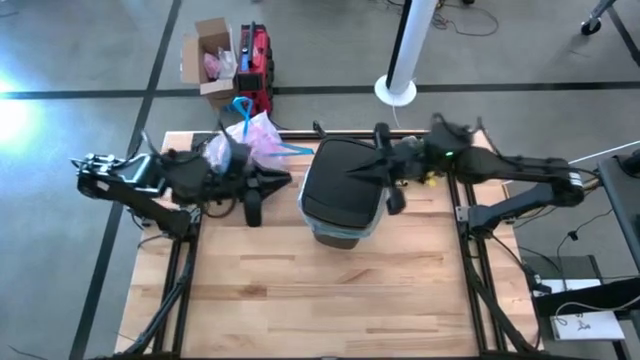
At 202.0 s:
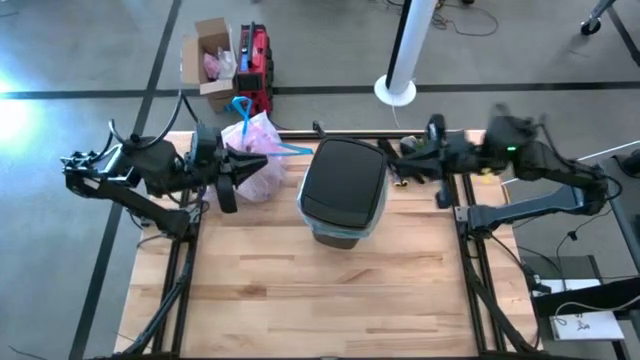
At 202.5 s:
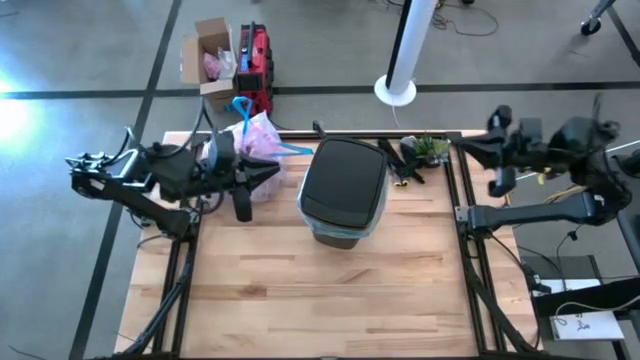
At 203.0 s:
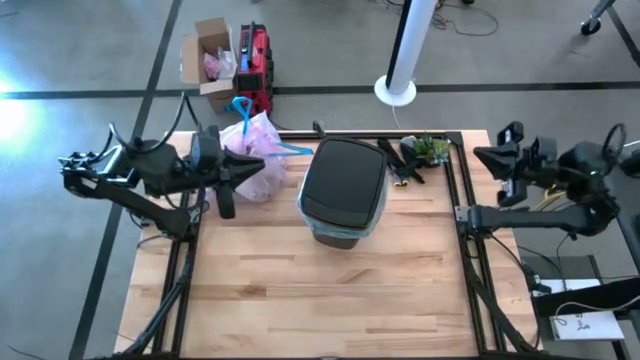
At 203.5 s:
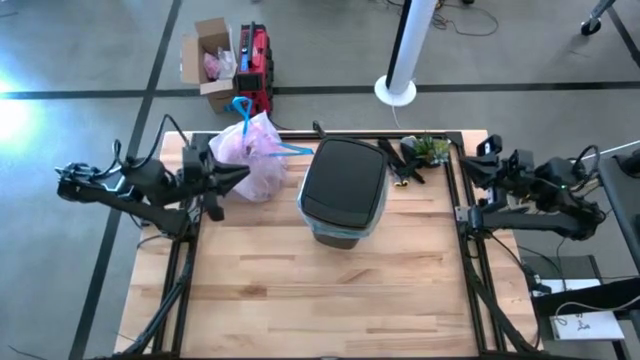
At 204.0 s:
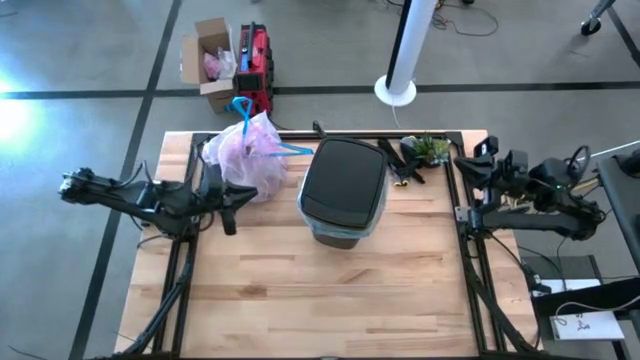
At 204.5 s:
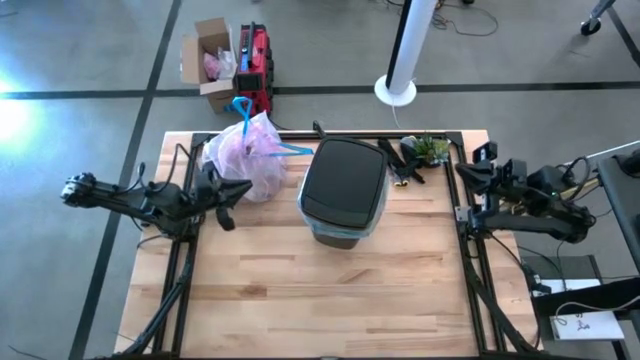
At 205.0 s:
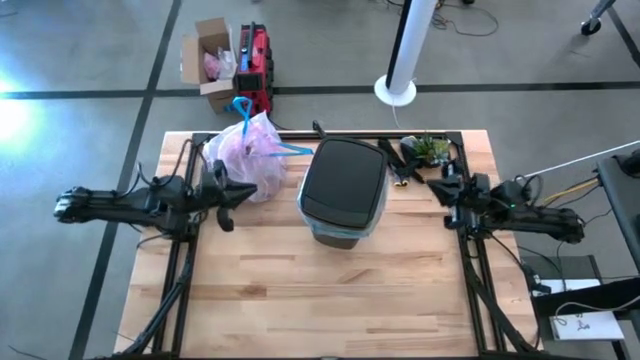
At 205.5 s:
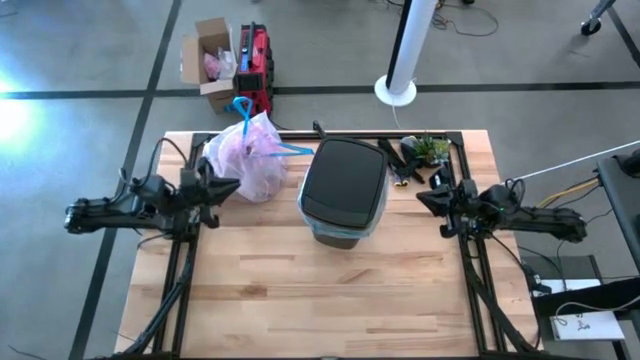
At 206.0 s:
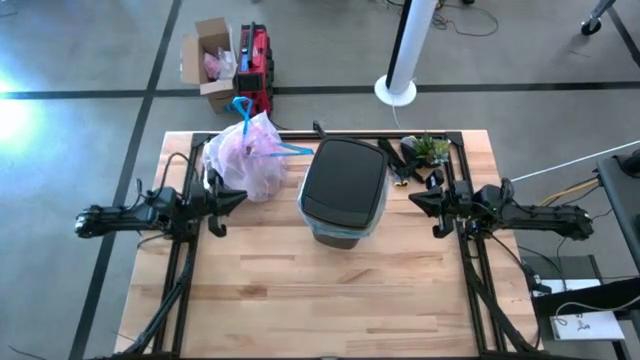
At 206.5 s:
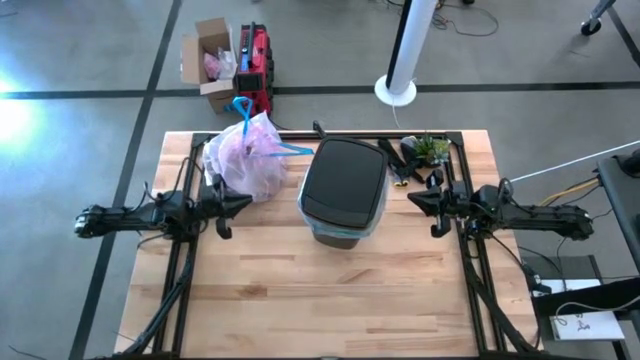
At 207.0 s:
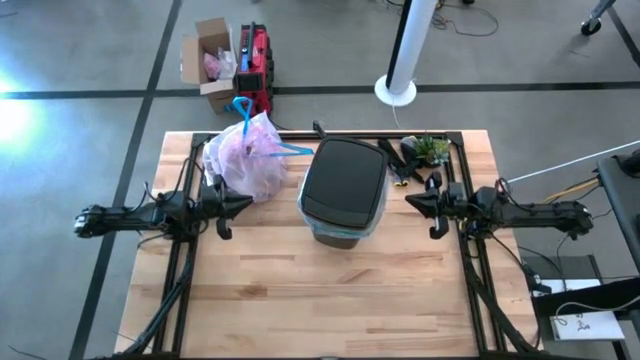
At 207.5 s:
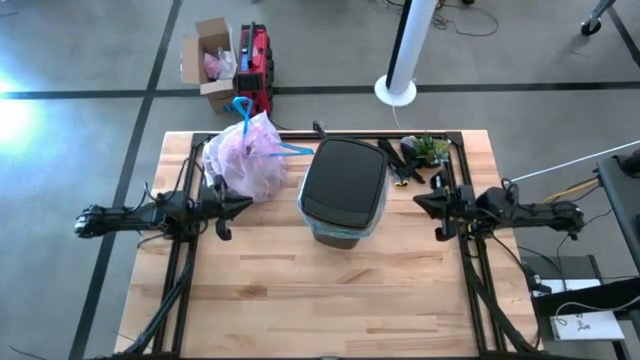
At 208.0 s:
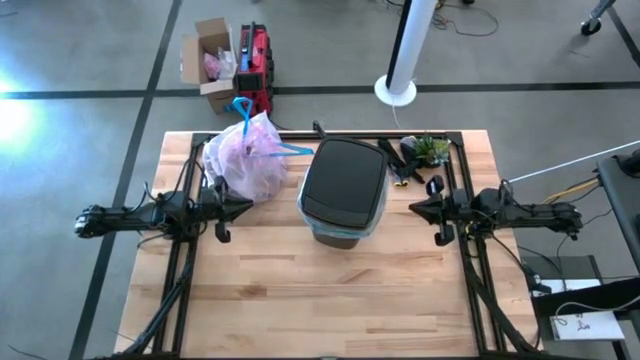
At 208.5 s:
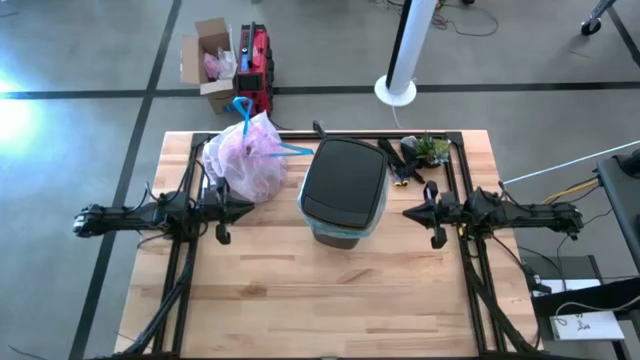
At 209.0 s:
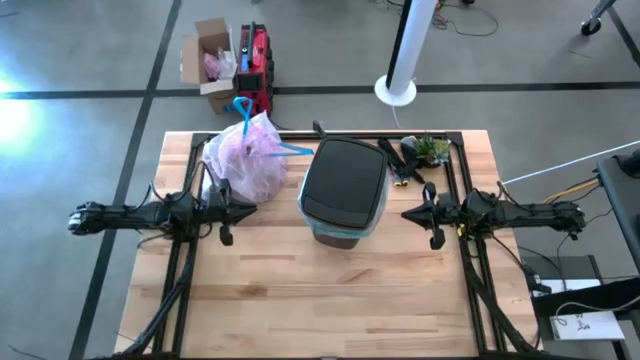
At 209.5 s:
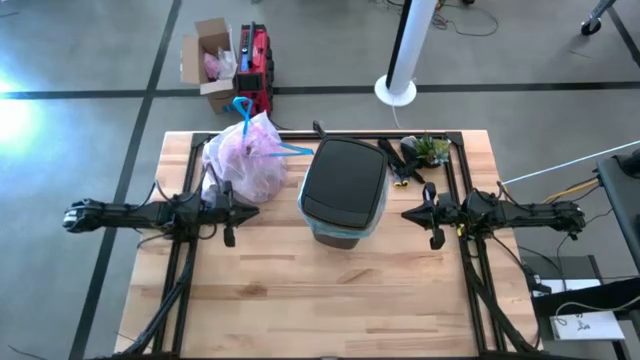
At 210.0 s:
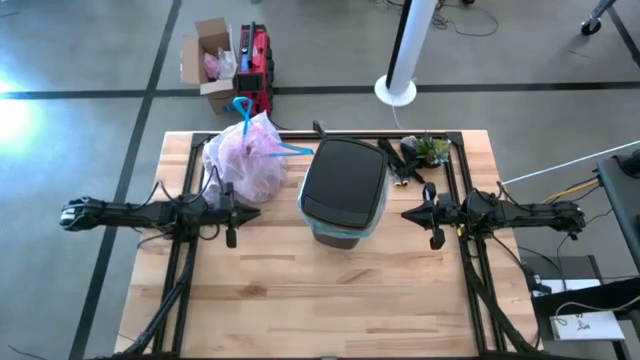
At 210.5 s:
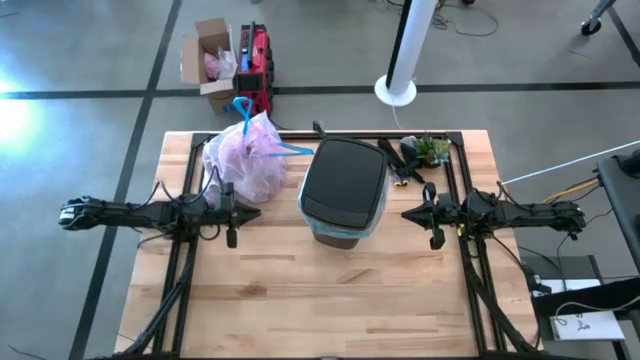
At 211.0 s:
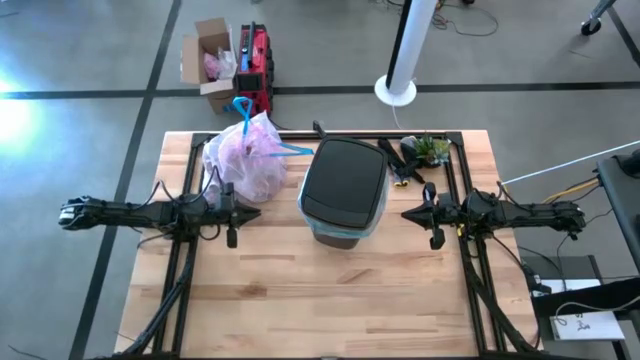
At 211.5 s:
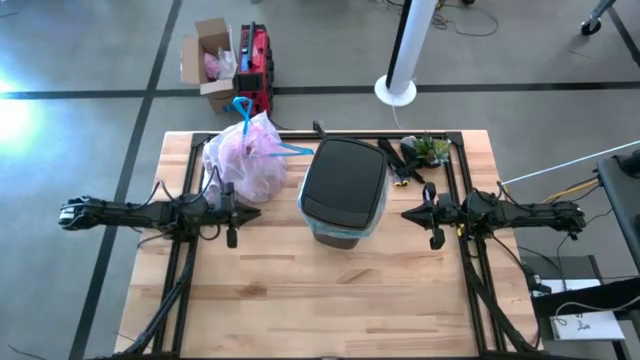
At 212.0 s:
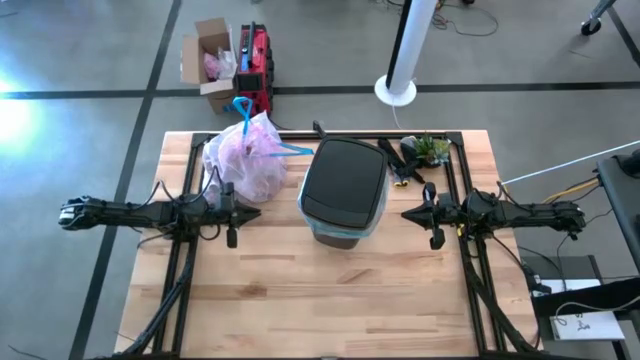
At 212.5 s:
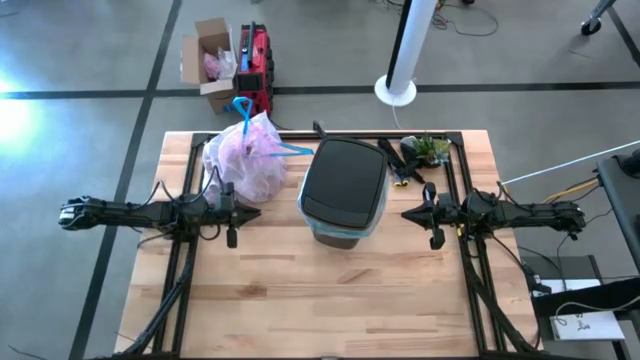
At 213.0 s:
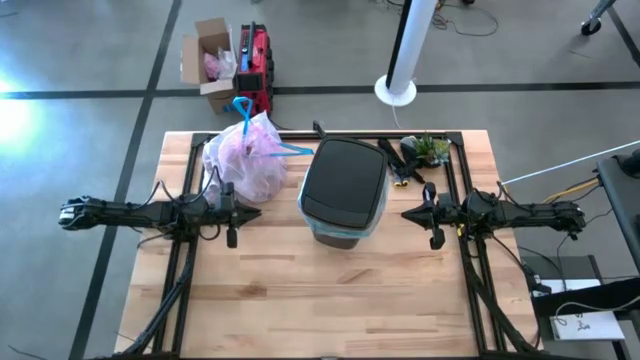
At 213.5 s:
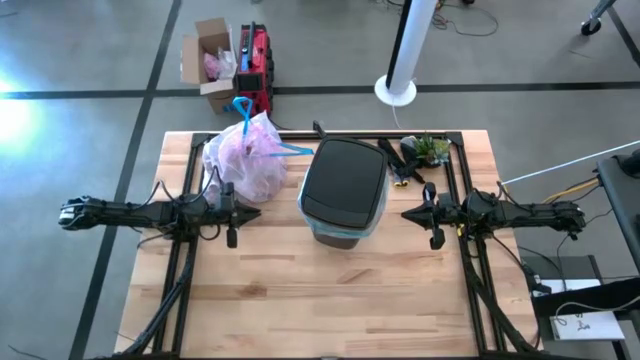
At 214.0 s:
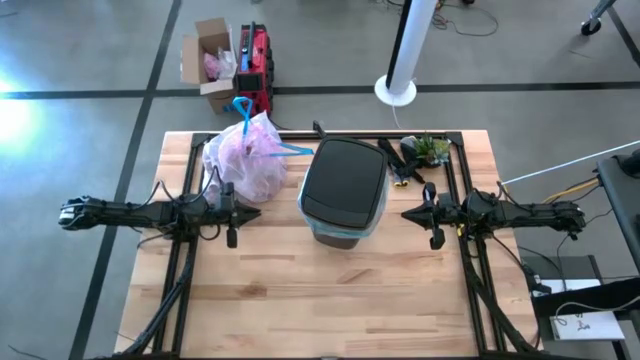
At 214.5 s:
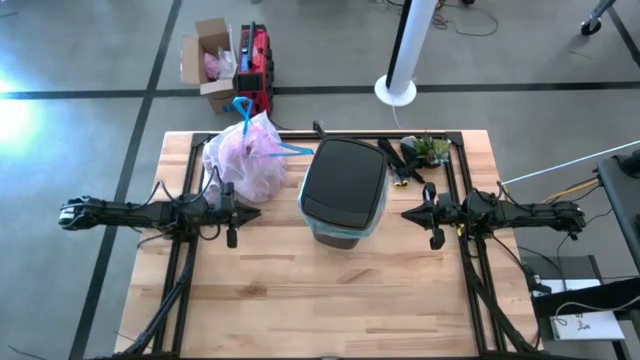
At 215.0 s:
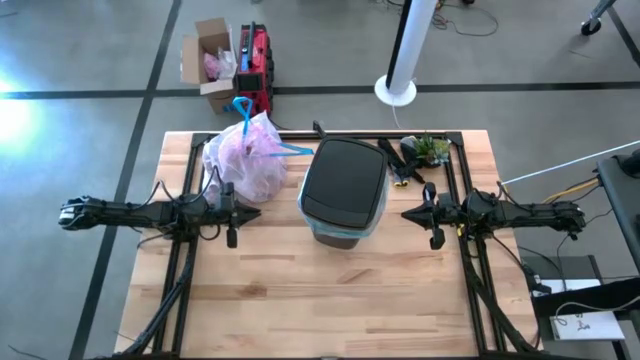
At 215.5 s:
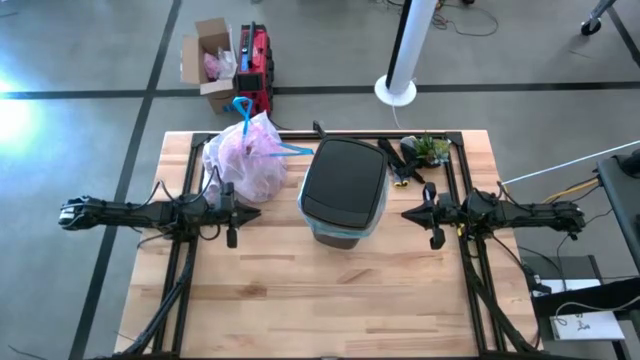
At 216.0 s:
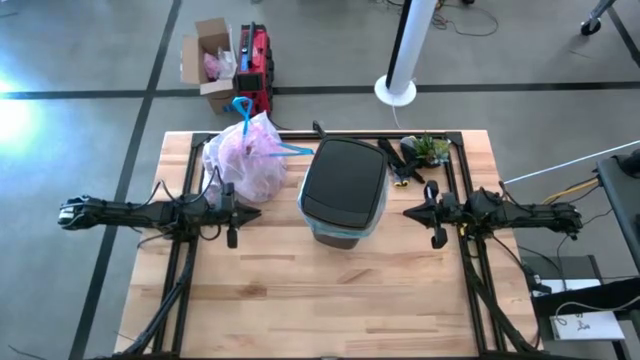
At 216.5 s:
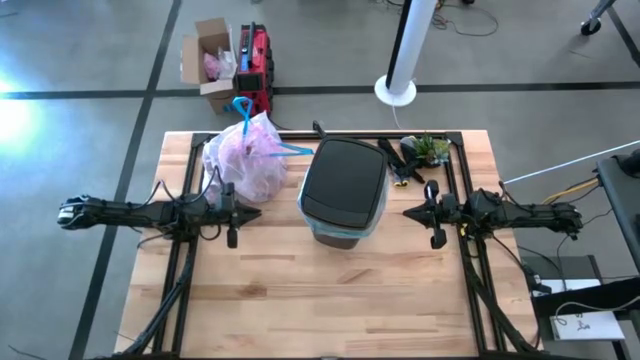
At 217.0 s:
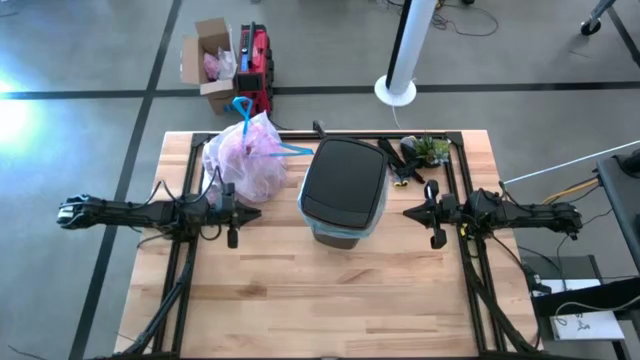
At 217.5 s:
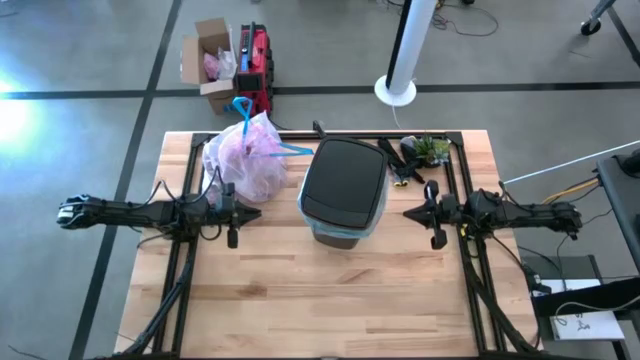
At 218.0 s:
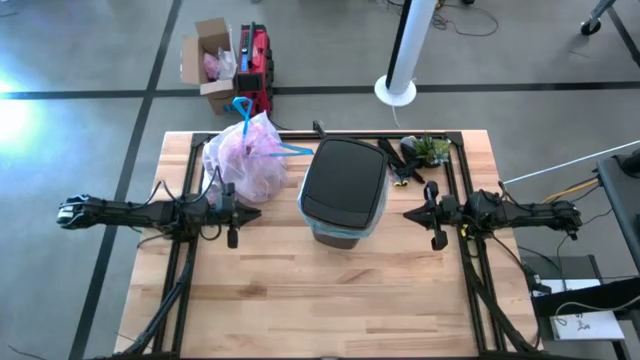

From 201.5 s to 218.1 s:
Task: place trash/remove bag and relplace
Return to Home Position

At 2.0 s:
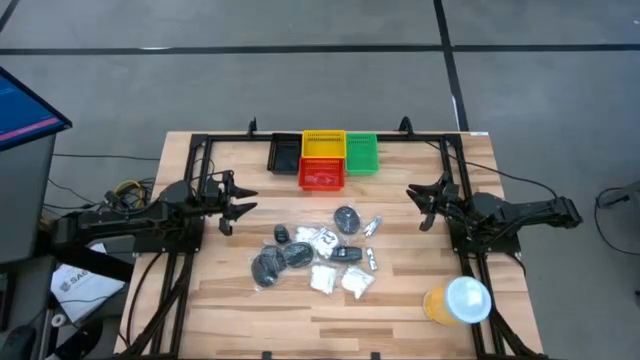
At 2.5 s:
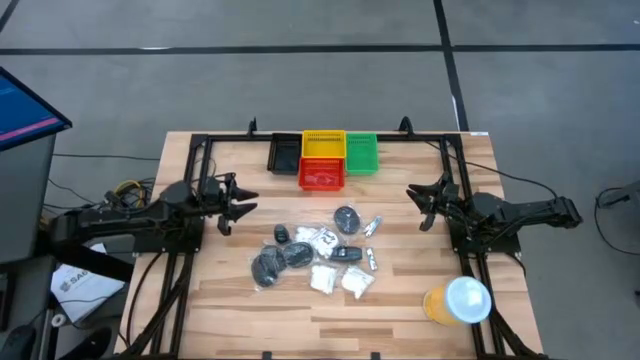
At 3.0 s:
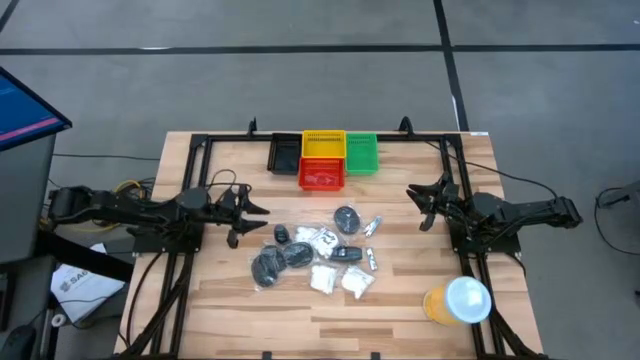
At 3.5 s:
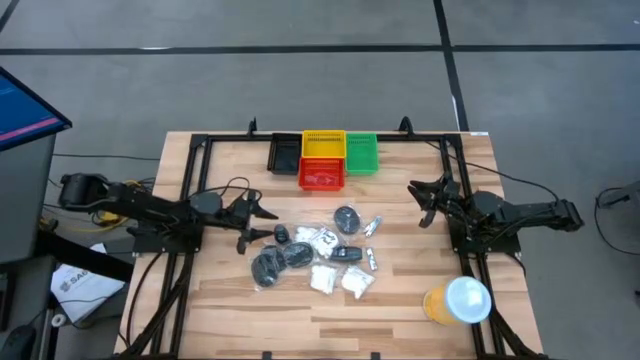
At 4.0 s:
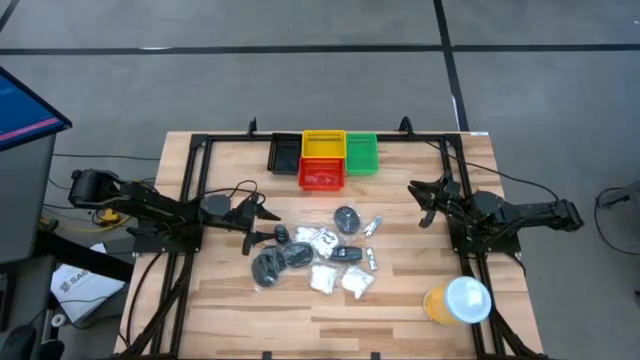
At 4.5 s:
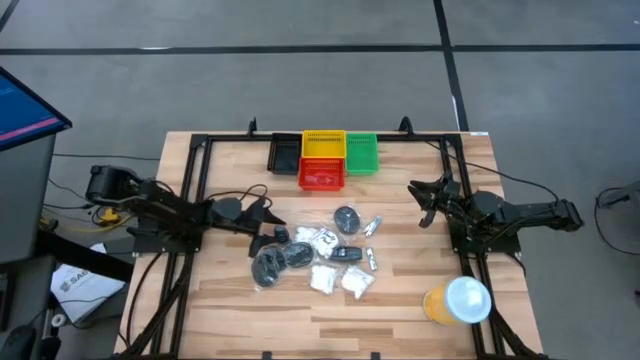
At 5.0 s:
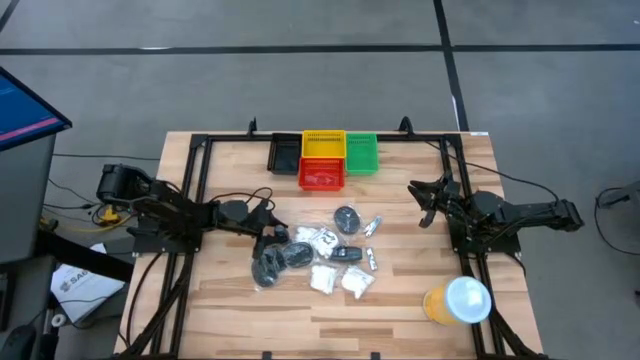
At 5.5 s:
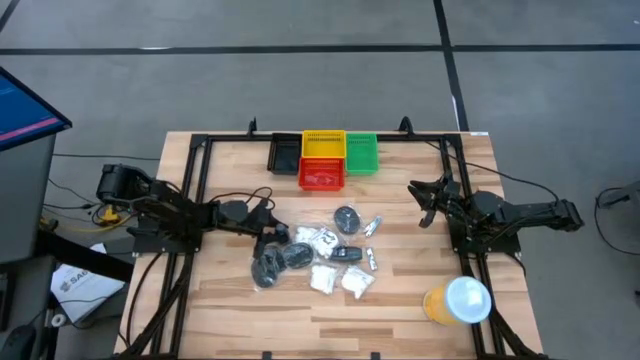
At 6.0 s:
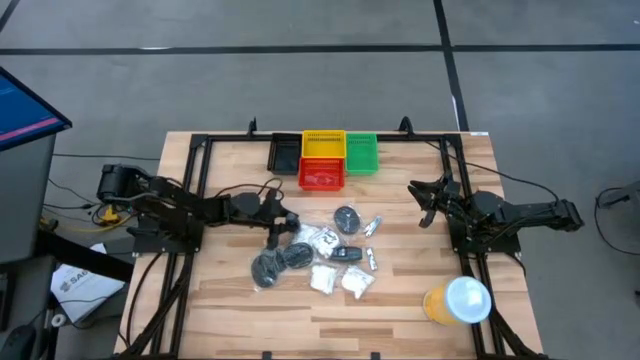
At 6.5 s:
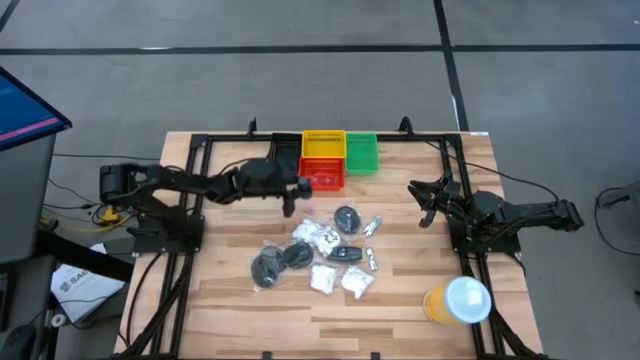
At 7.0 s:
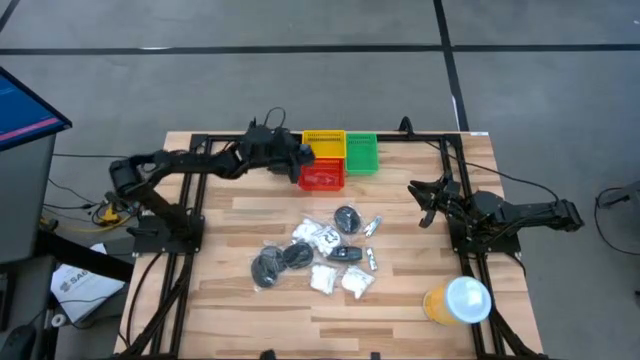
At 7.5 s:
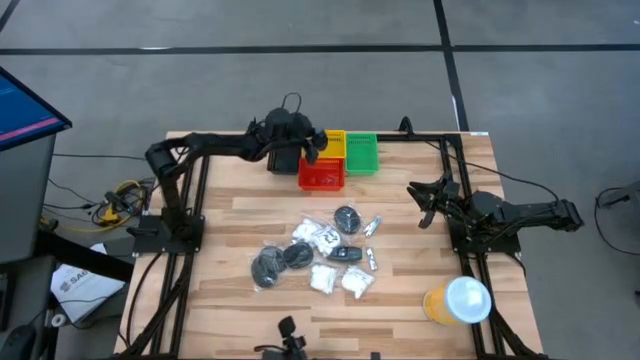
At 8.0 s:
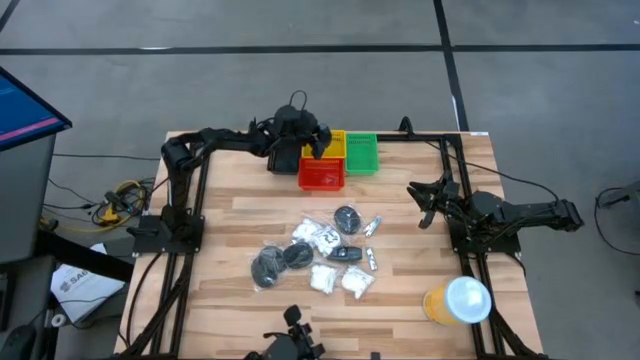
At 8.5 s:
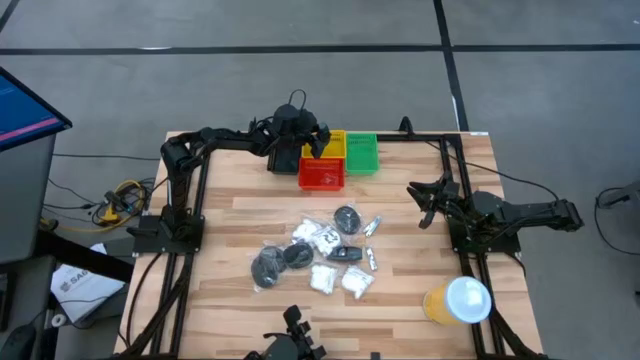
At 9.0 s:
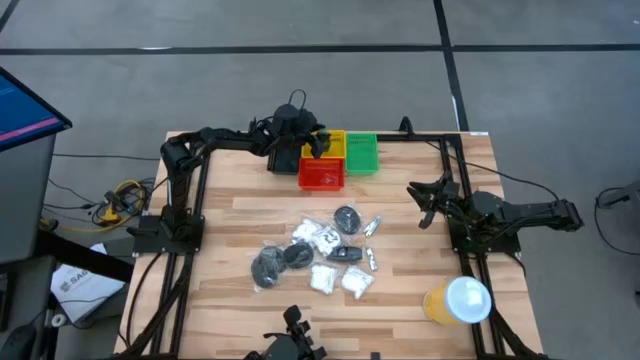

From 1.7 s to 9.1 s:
Task: Pick & Place Travel size toiletries
Put the black deodorant into the yellow bin
